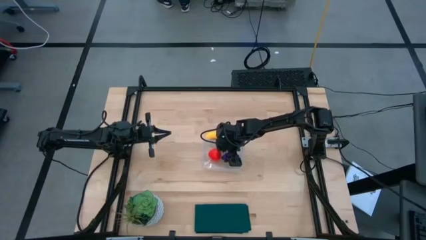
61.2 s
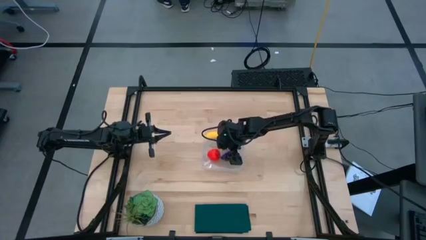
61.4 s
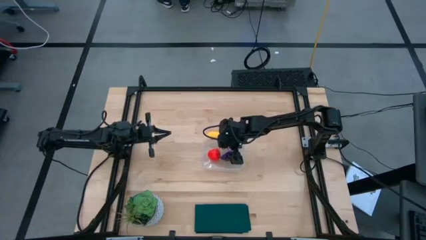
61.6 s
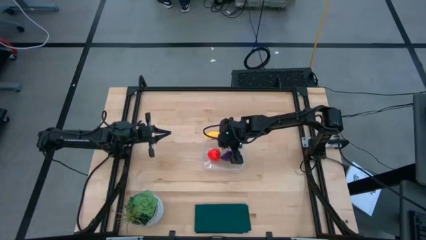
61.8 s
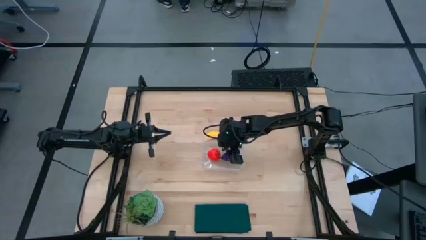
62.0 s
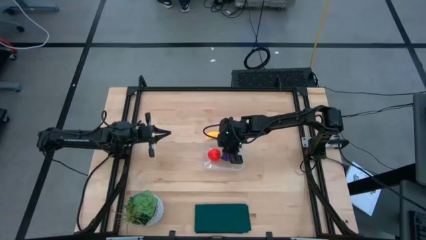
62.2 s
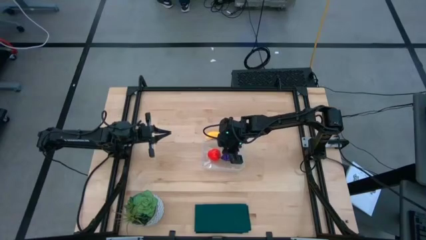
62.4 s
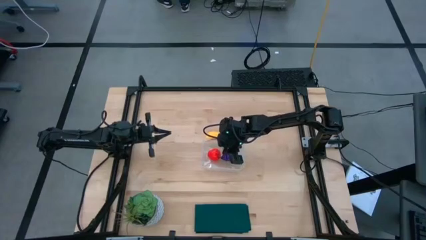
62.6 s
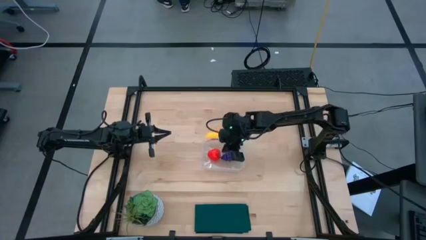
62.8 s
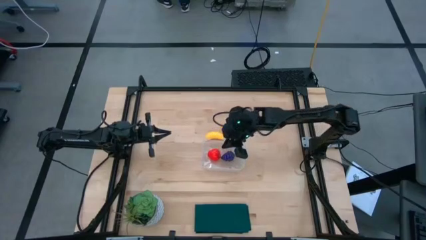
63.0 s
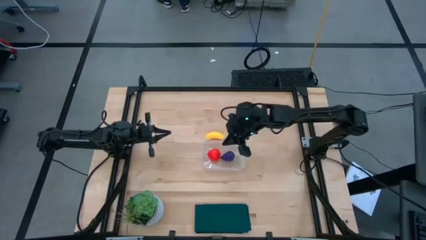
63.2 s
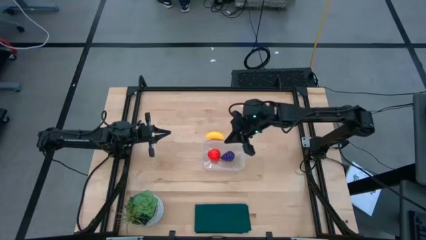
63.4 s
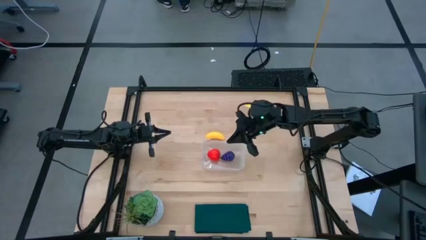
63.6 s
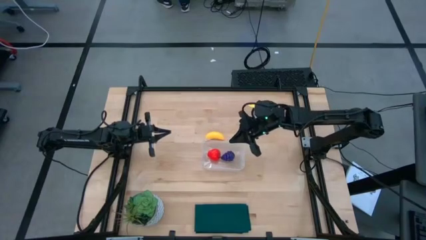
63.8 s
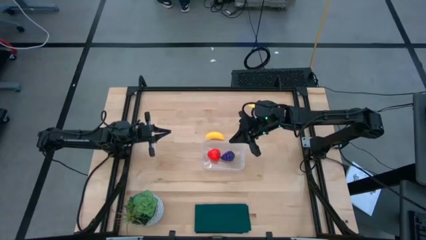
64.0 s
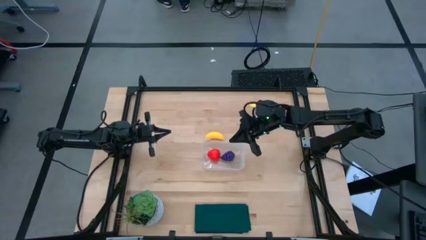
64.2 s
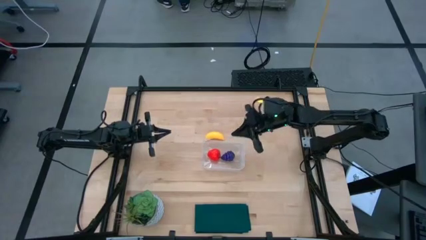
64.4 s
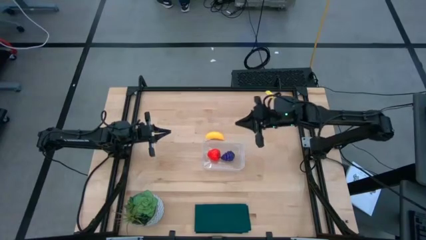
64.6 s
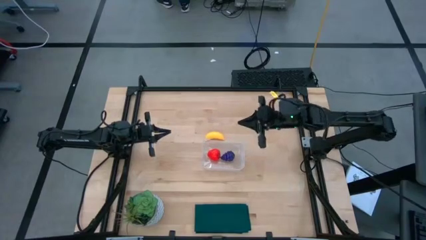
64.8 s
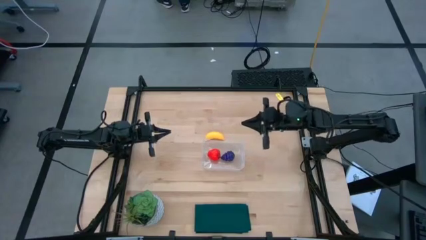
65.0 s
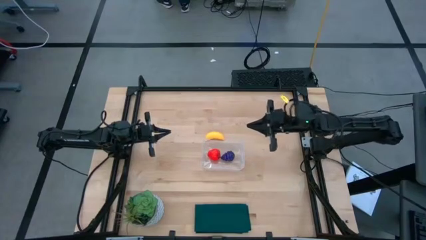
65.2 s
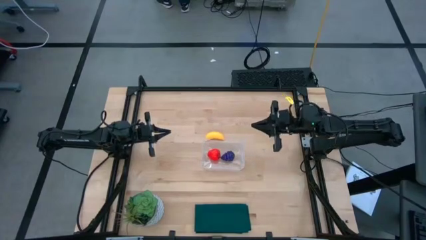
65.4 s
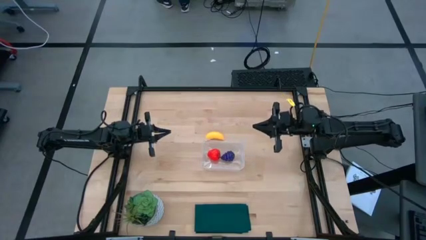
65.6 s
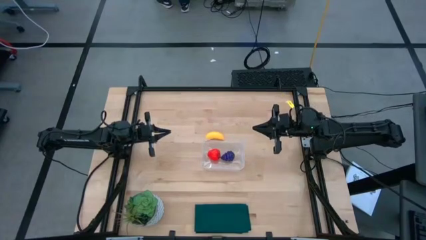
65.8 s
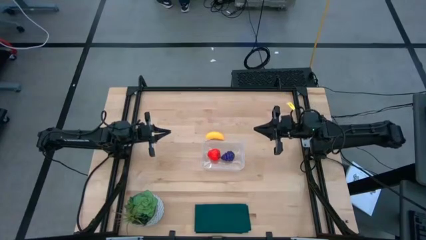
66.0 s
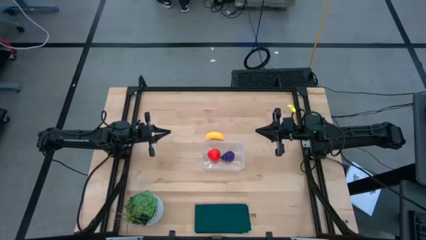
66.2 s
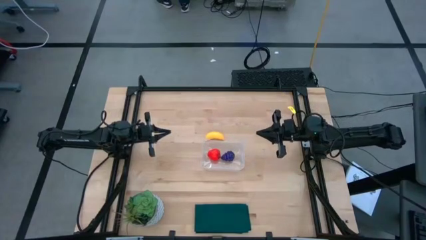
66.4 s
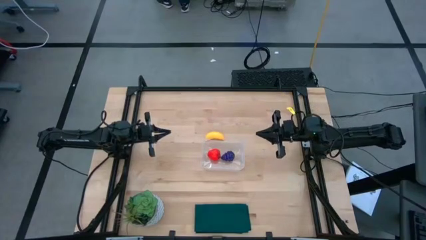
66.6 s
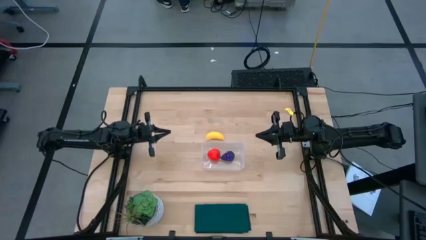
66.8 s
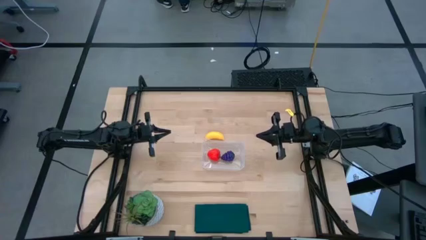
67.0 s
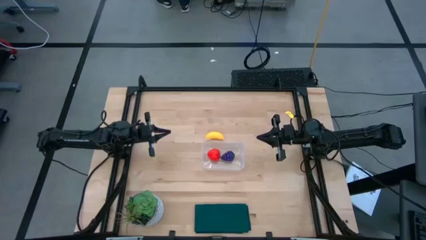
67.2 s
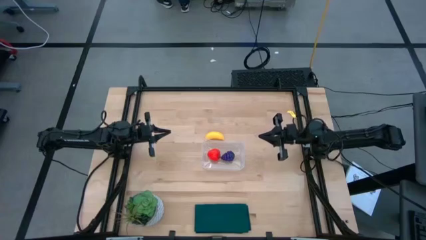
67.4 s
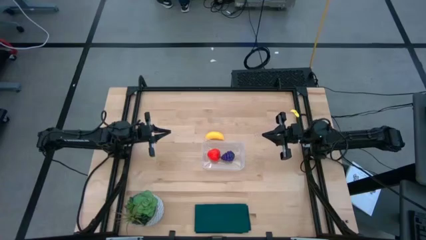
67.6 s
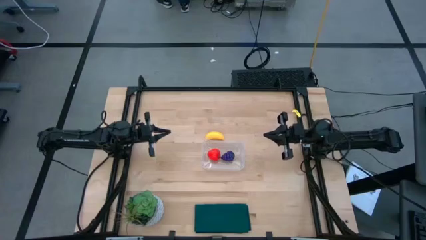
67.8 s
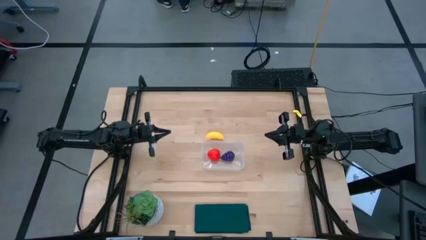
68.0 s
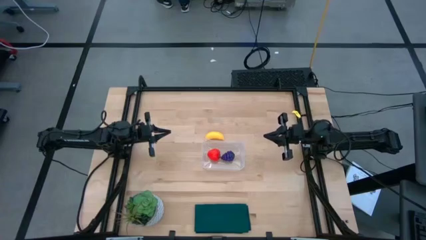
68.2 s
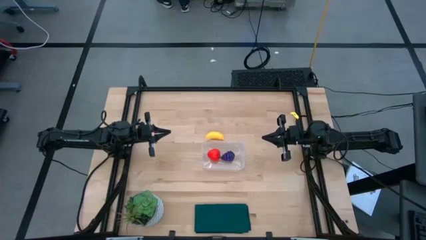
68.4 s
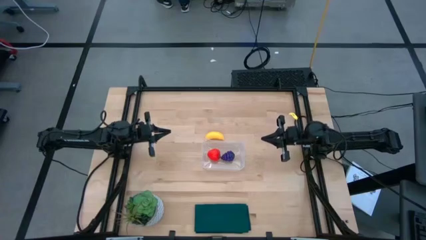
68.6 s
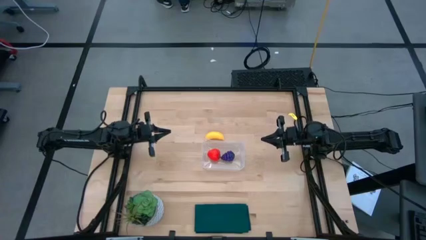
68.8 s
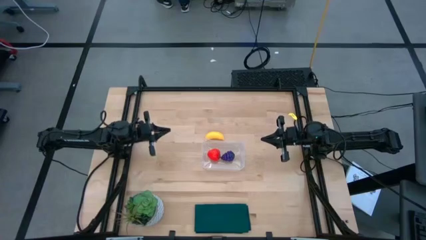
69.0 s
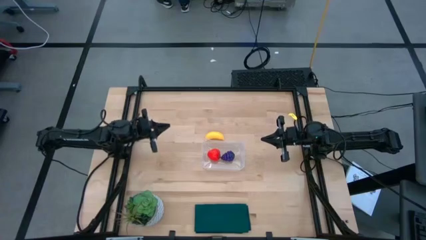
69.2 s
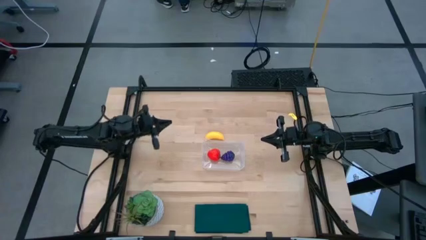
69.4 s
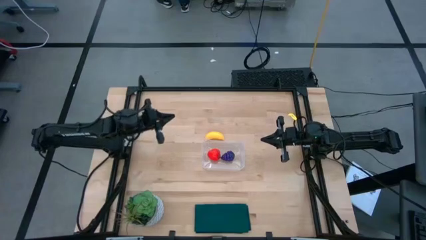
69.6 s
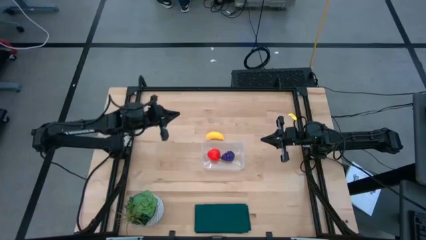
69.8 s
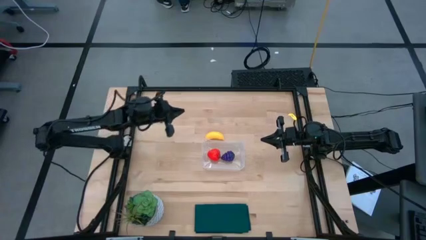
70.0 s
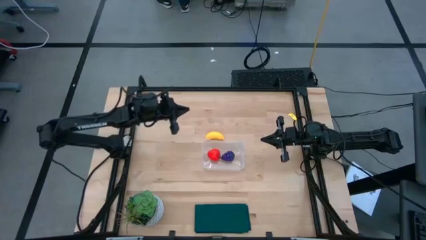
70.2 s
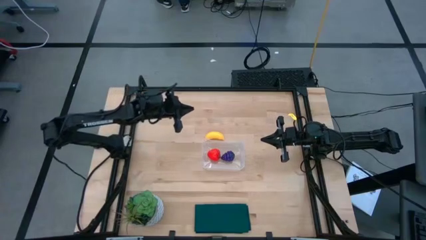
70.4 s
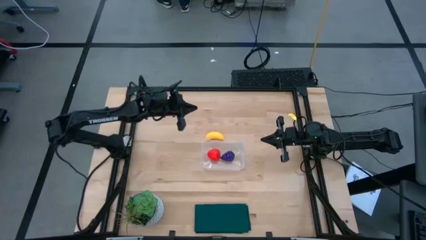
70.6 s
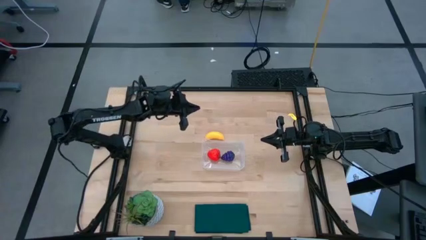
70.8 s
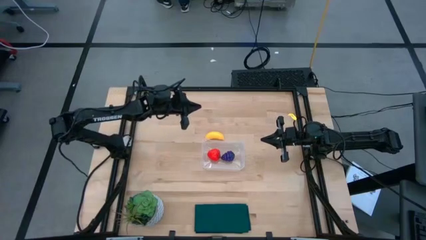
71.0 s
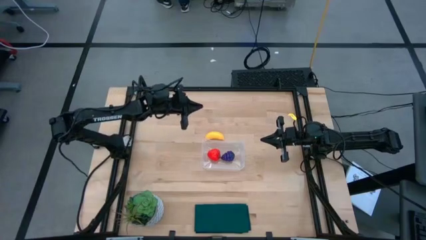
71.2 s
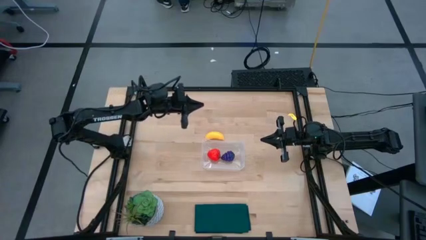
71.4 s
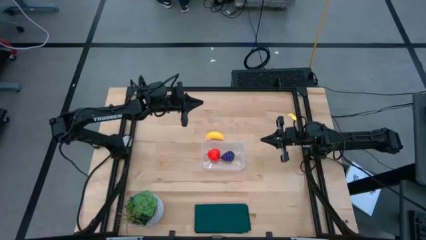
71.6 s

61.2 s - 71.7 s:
Task: Pick and placing Produce into tupperware
Put the banana into the transparent bin
